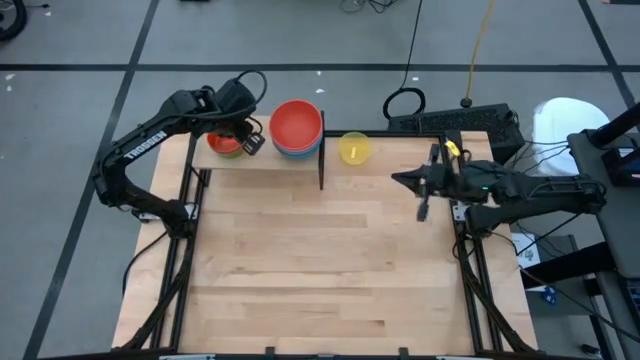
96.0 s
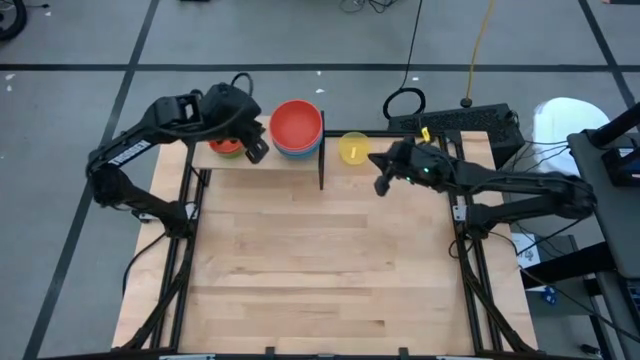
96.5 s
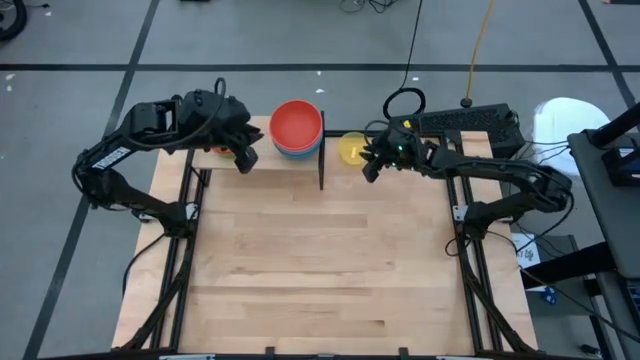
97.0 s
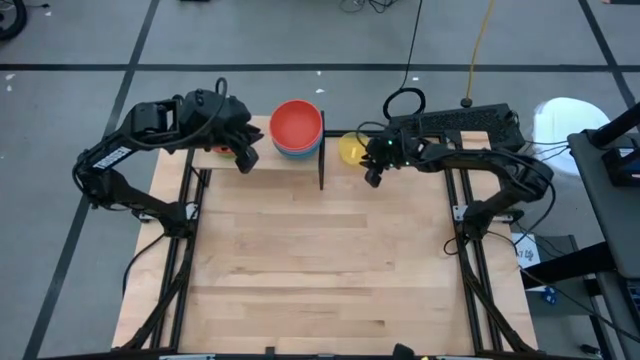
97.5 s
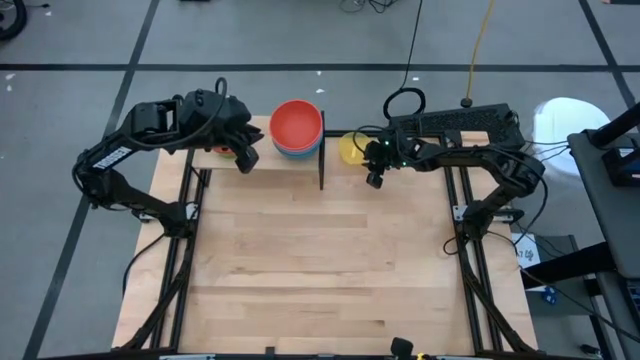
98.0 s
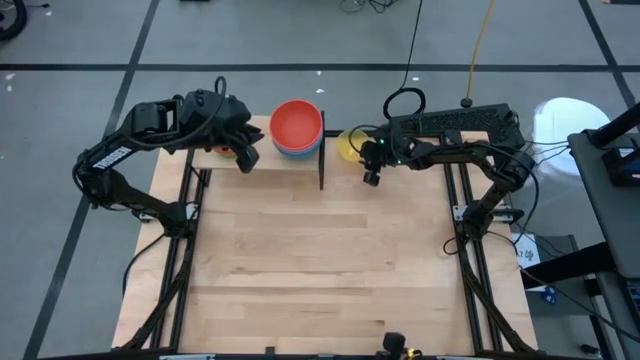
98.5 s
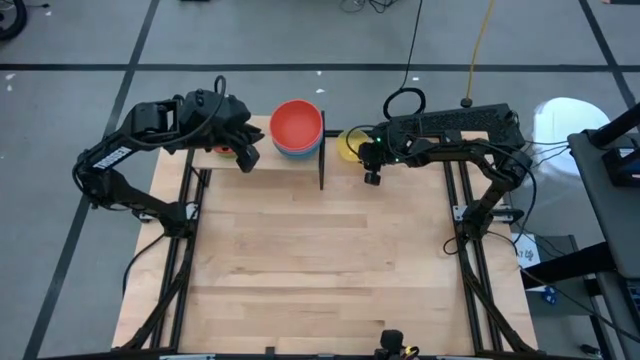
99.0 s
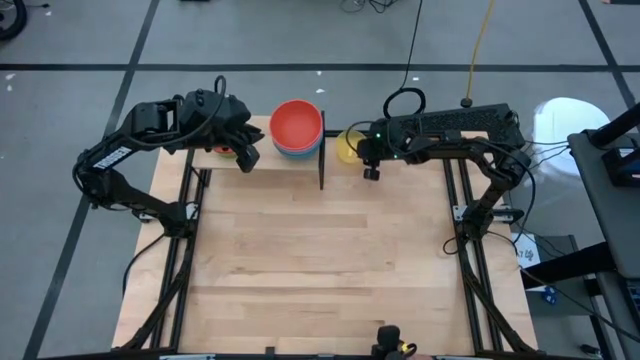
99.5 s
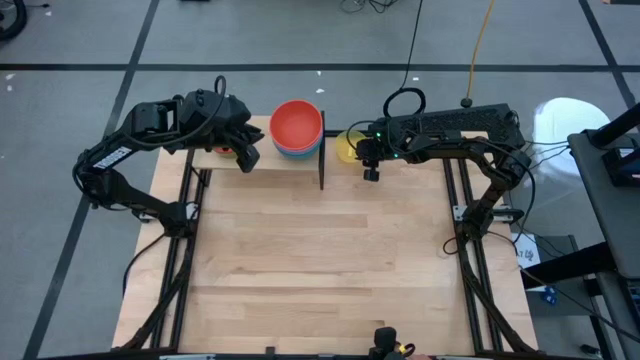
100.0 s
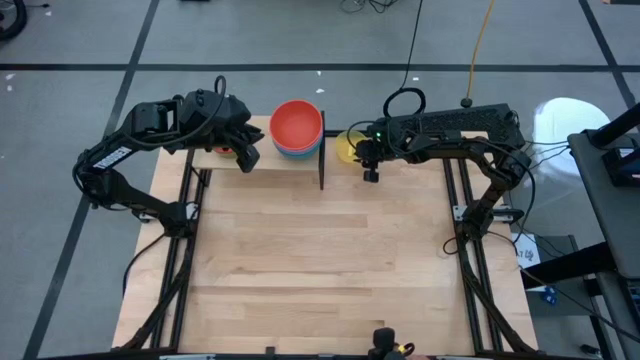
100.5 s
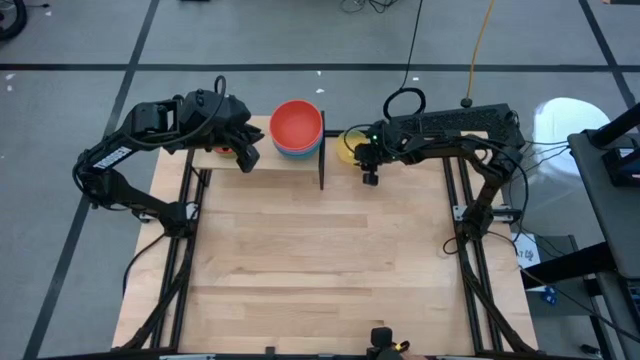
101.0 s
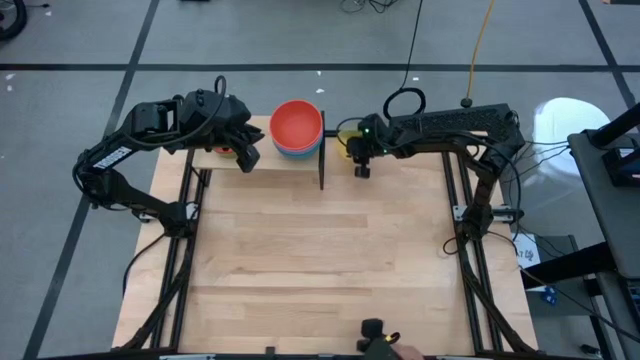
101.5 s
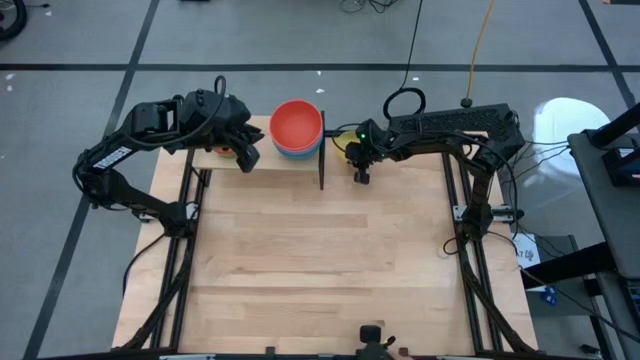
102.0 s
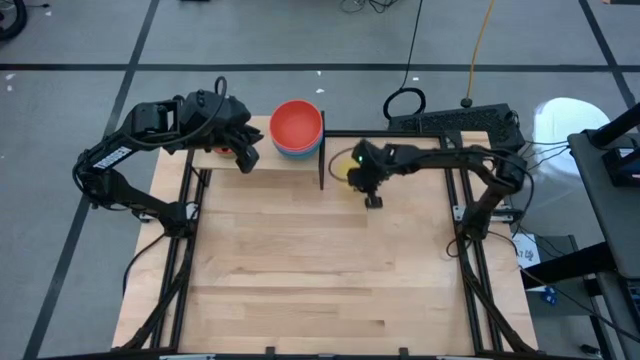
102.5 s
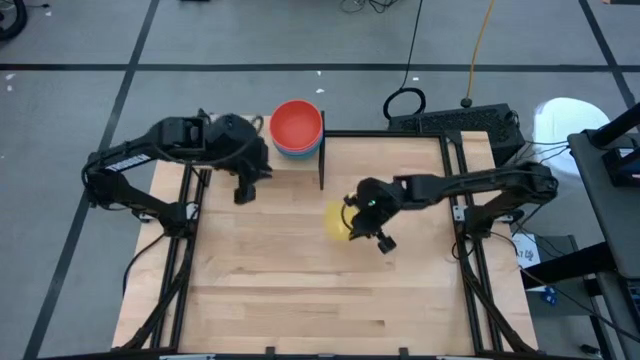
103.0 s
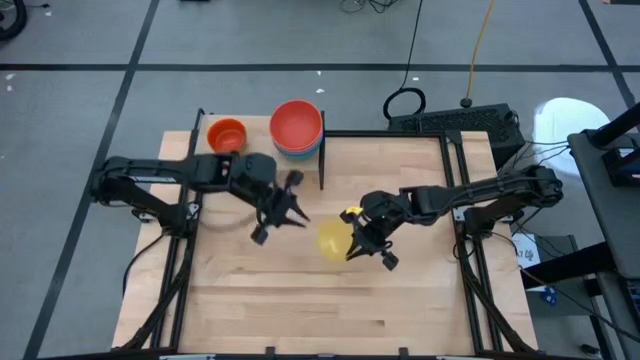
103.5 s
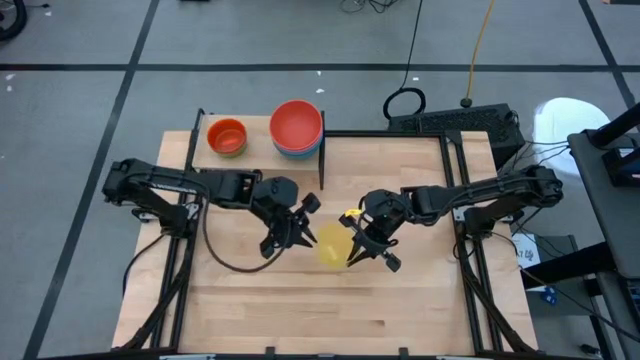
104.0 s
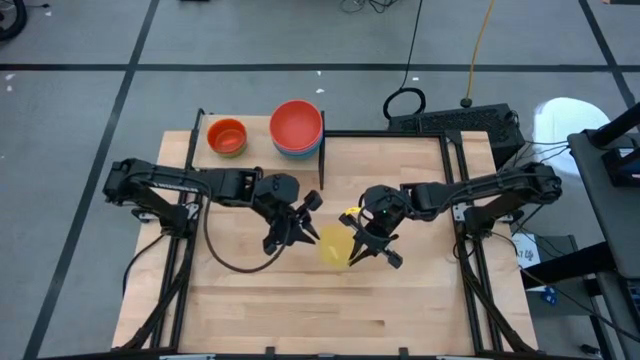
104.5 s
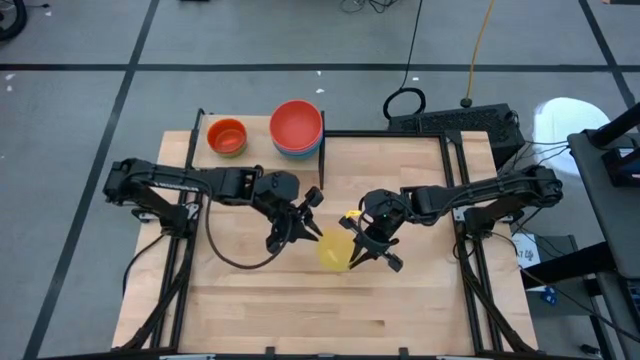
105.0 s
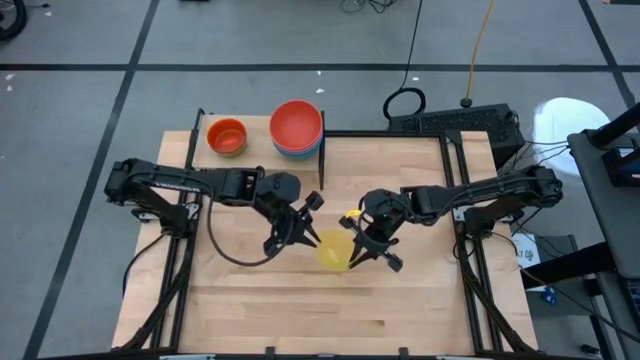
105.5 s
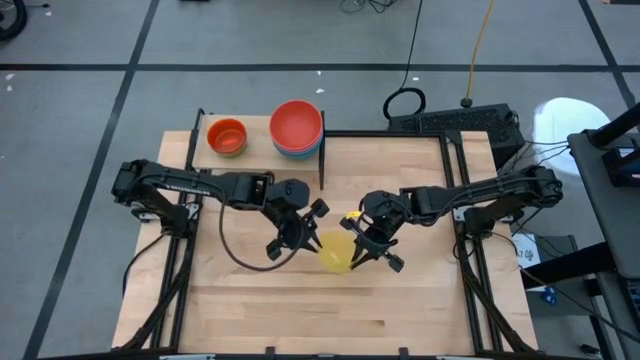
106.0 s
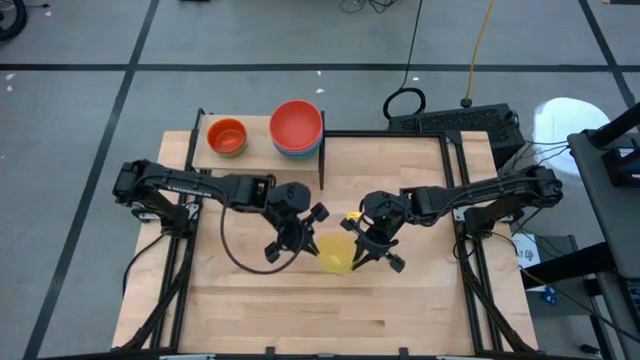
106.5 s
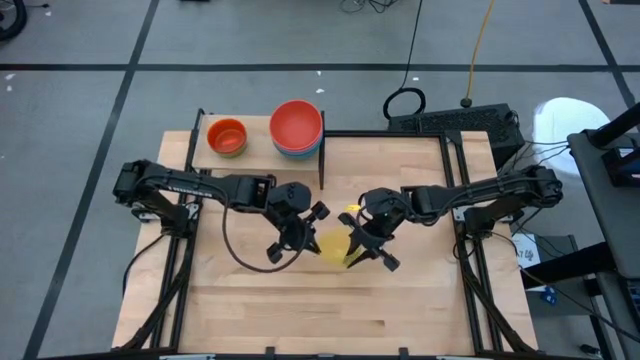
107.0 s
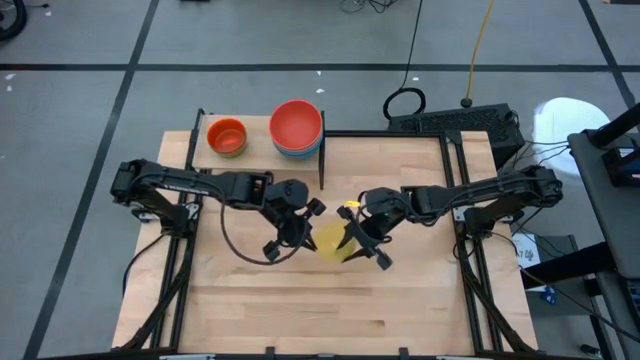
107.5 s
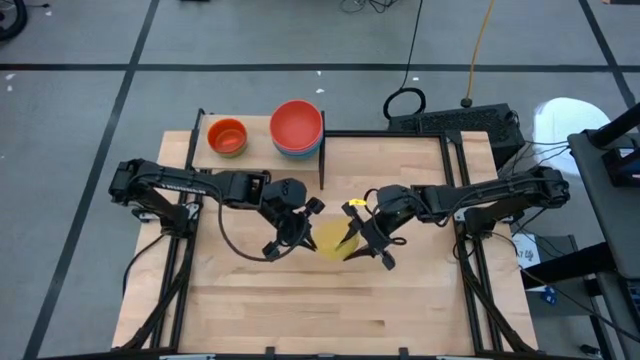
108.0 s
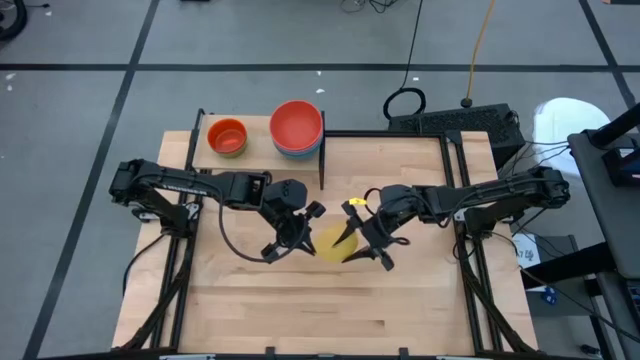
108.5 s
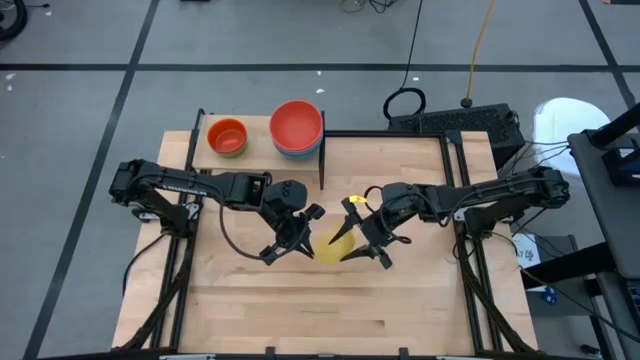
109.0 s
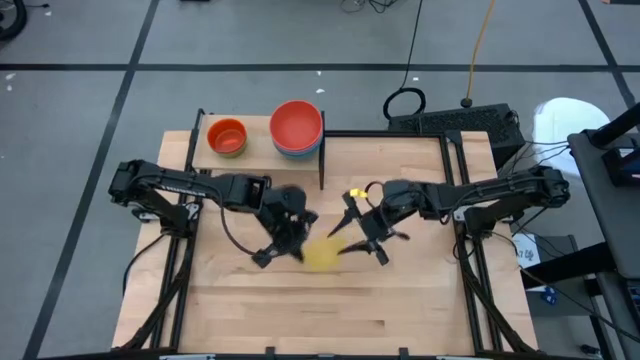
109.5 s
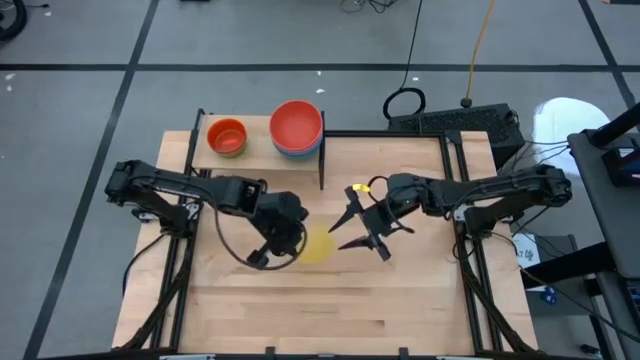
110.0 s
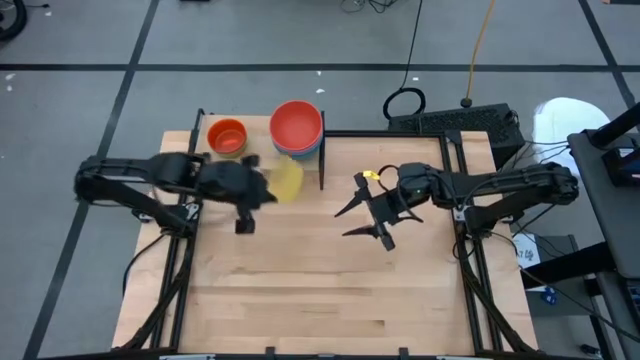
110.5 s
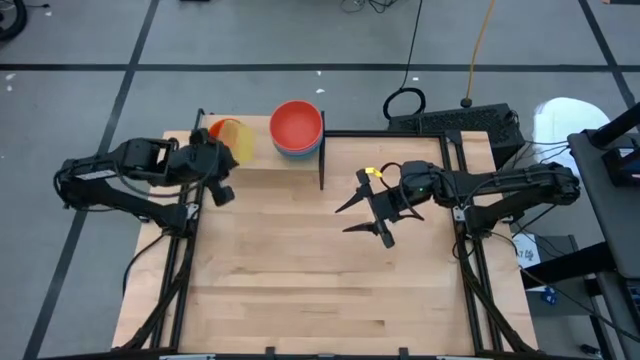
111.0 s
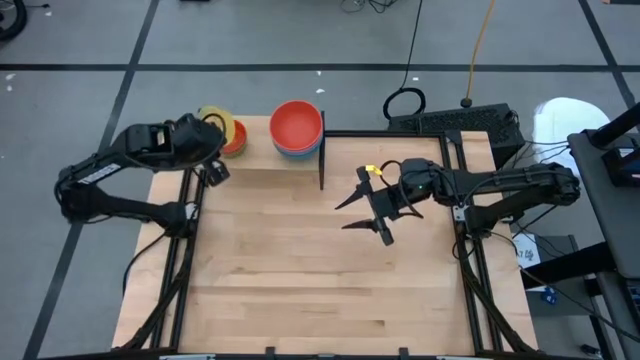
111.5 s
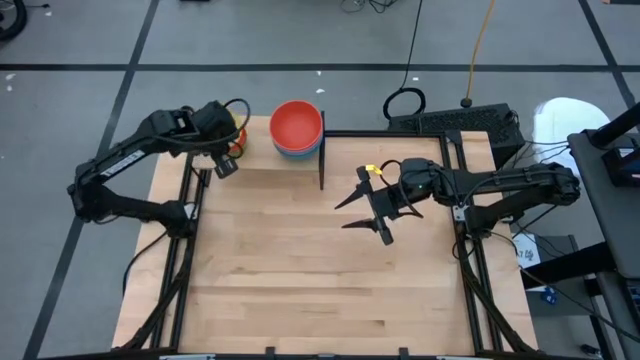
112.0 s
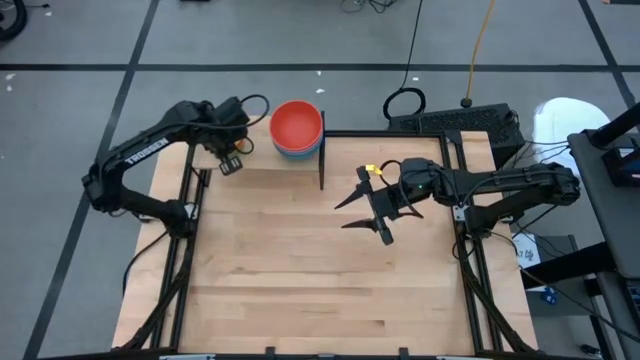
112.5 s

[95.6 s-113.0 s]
Task: Place and stack bowls onto a shelf
Stack the yellow bowl on top of the orange bowl on the shelf
